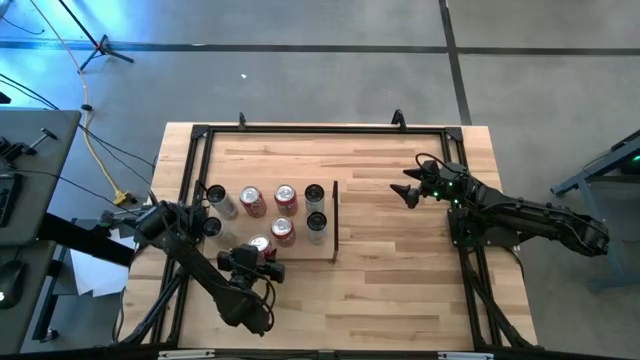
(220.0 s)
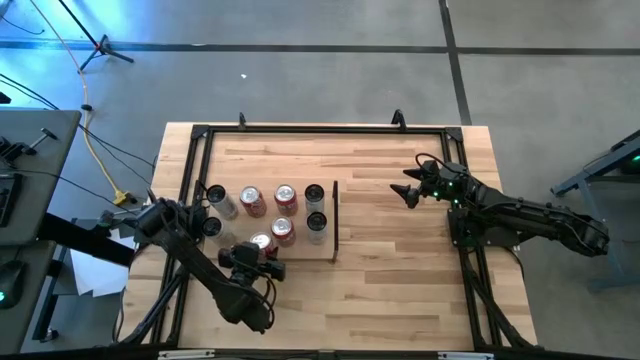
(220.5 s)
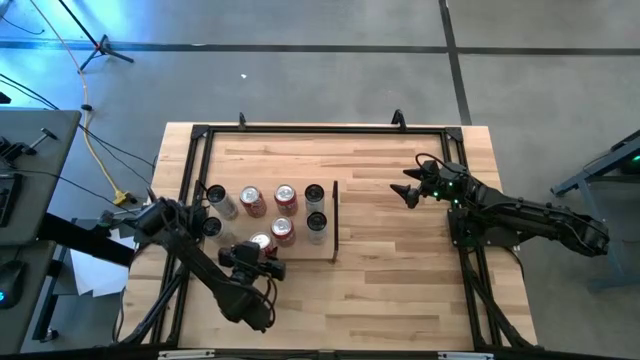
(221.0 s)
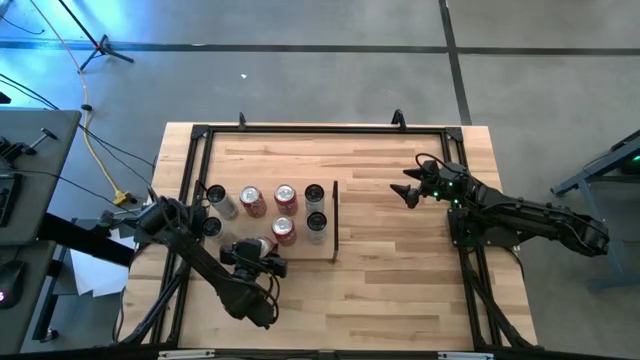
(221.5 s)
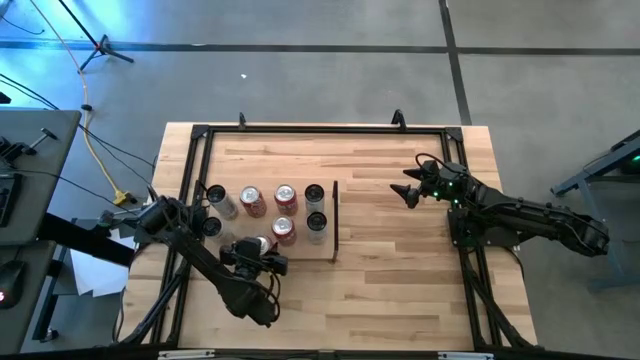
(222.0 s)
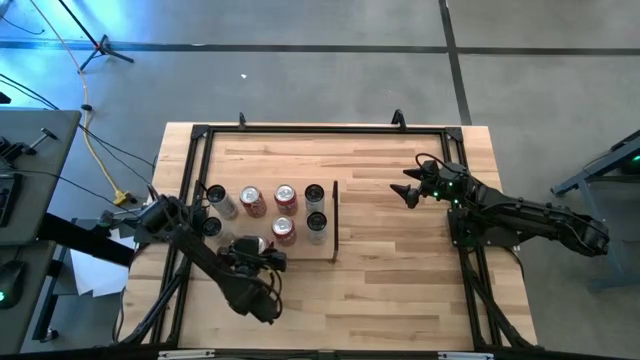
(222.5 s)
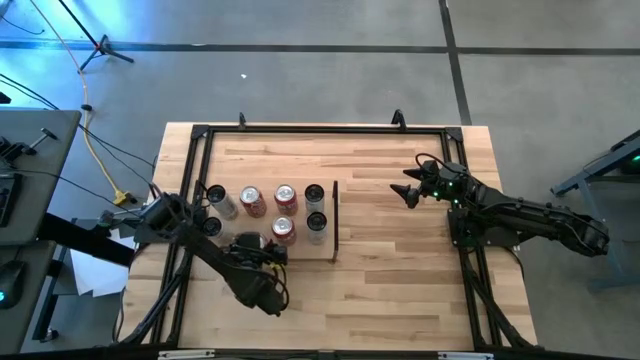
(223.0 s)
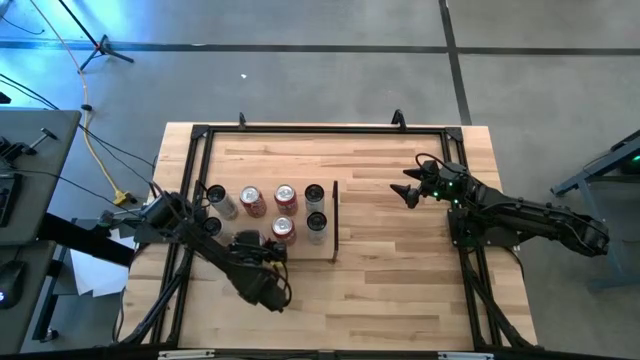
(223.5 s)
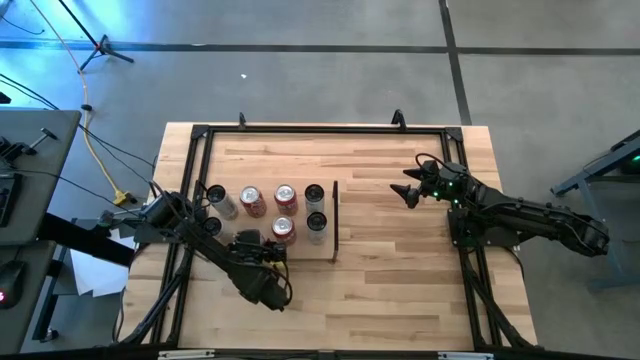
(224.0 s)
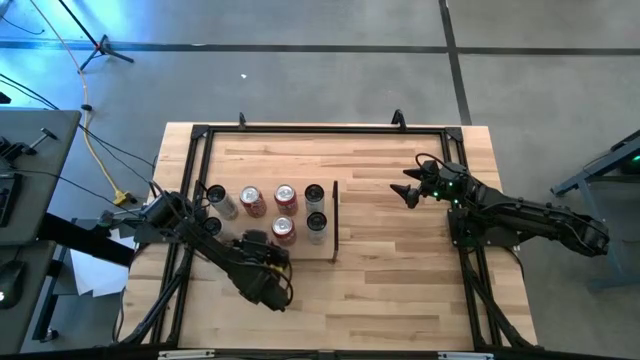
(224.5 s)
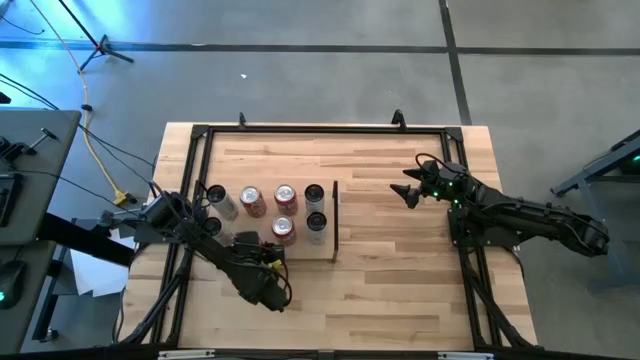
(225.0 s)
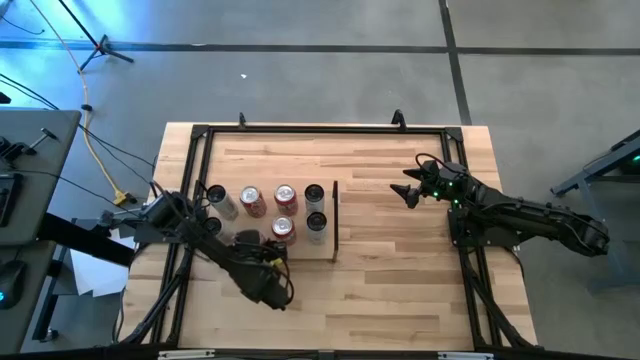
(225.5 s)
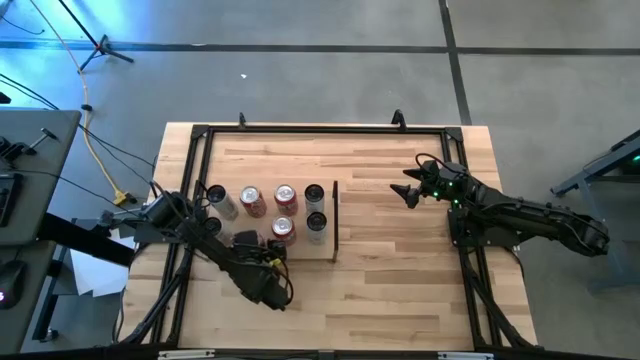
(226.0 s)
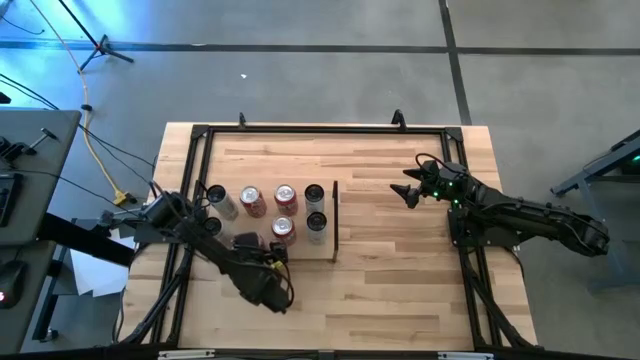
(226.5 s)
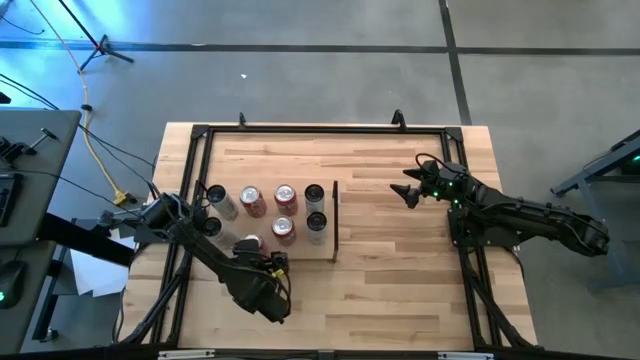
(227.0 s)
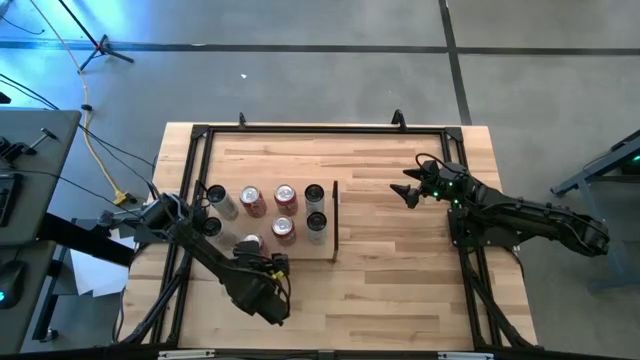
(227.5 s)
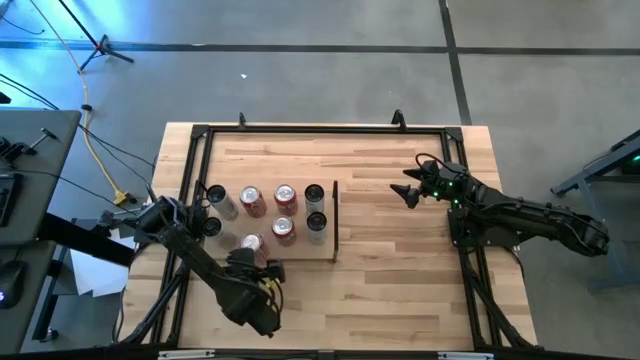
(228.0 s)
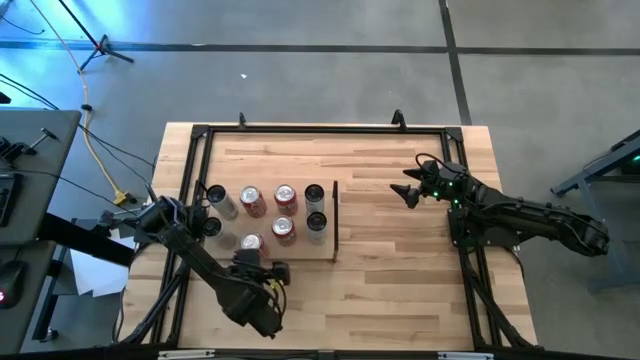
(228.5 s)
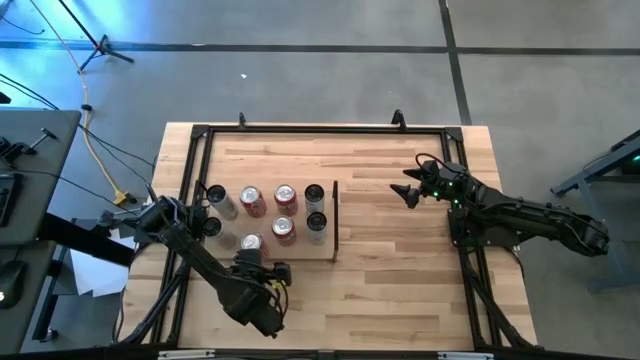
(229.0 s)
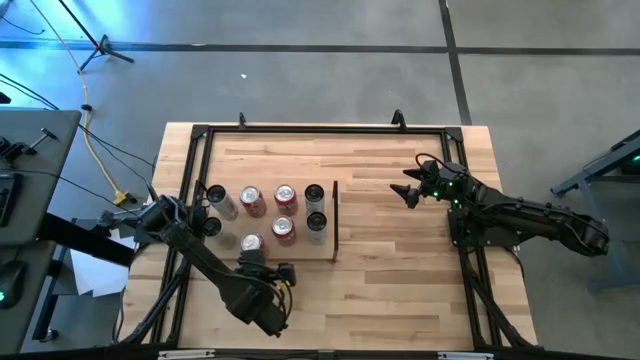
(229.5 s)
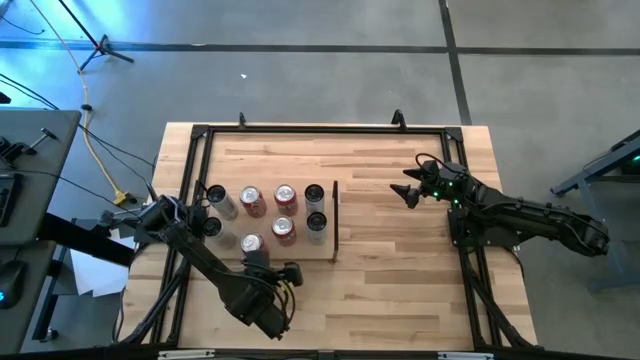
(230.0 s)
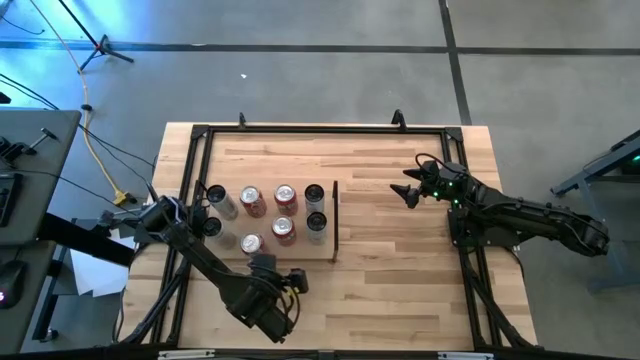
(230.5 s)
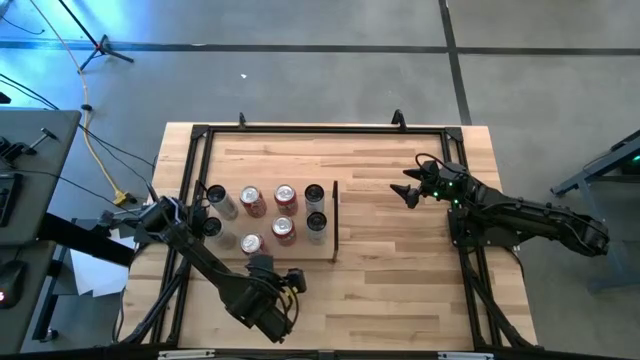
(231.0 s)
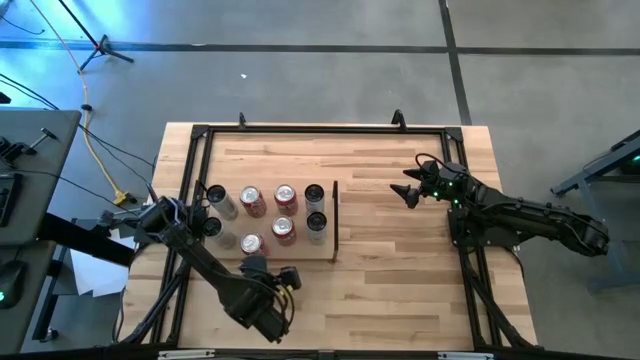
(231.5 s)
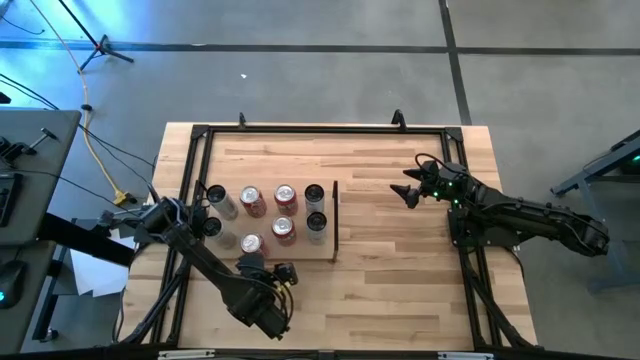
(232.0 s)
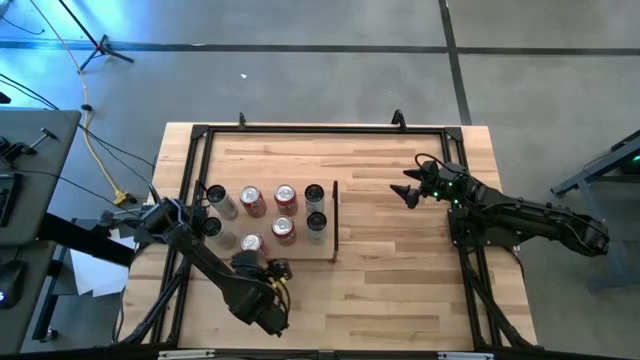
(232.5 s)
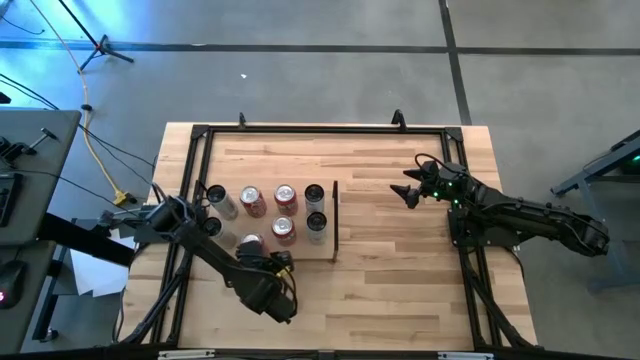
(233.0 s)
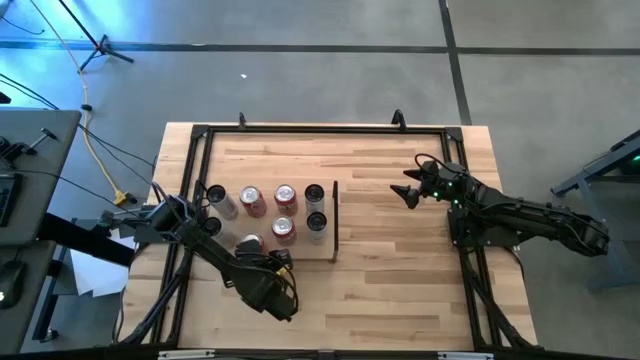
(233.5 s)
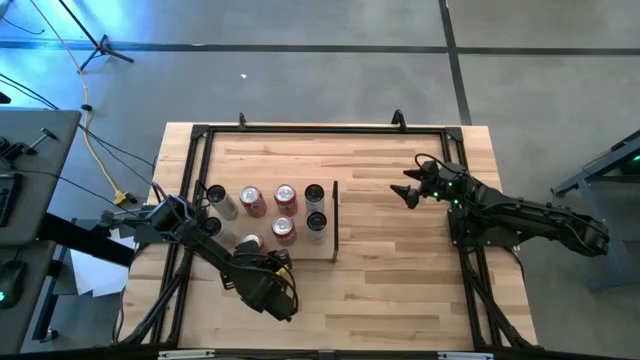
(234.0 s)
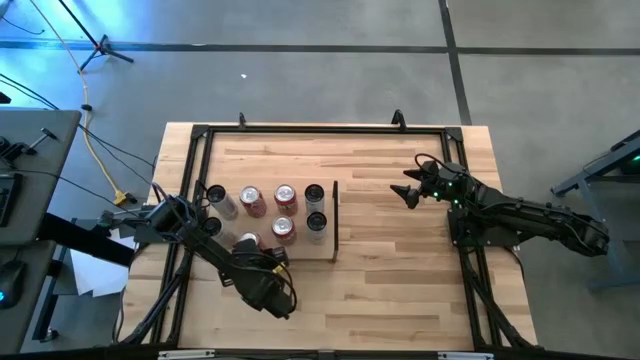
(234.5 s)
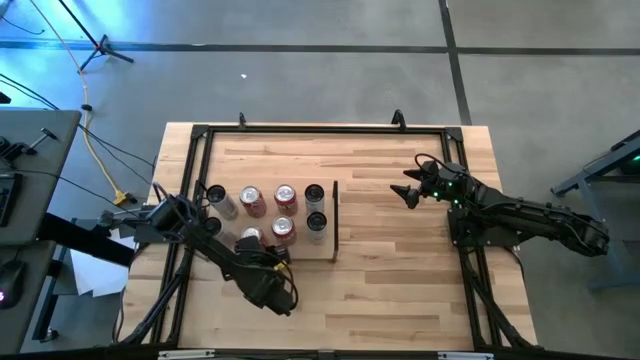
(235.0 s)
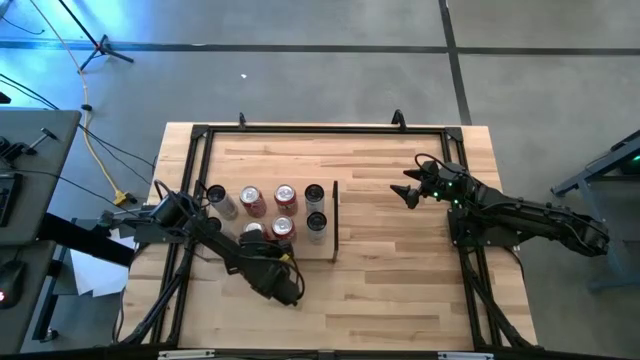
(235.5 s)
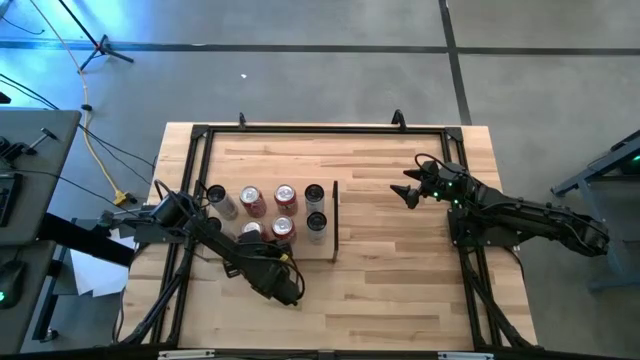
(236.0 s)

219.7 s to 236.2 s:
Task: Place canned beverage on shelf
Put the right red white can aligned with the other red white soda can on the shelf

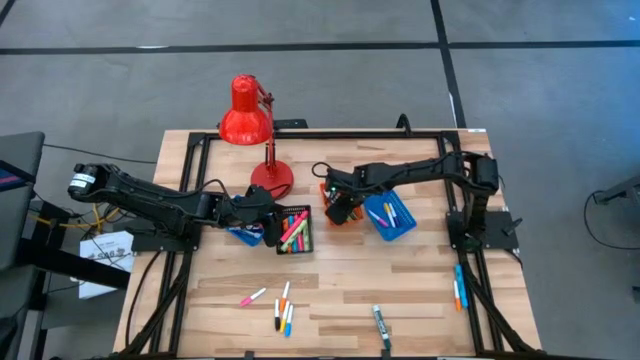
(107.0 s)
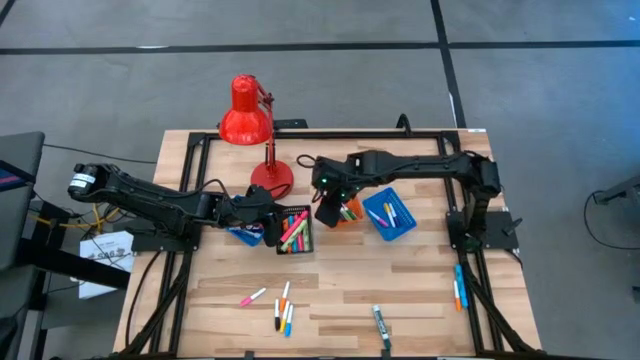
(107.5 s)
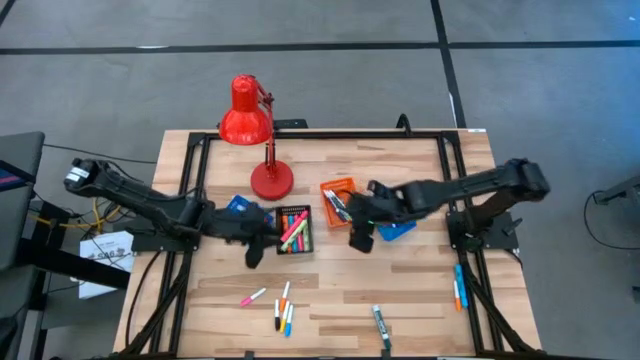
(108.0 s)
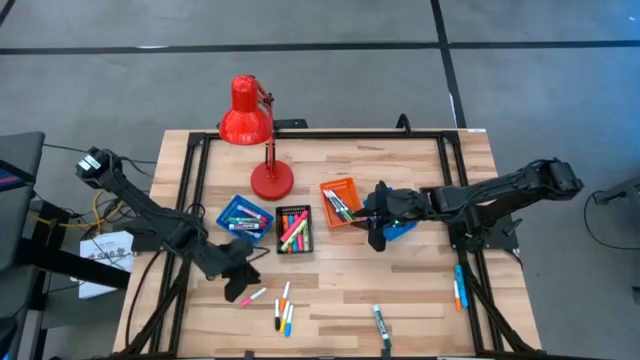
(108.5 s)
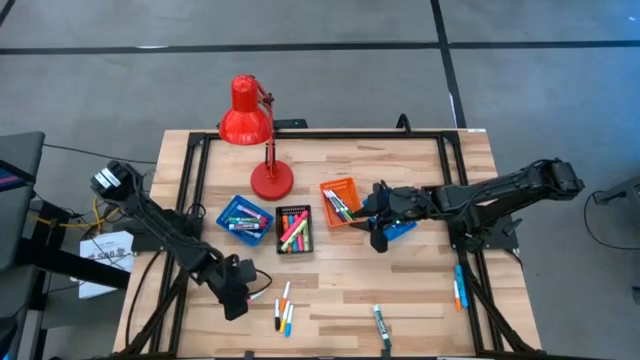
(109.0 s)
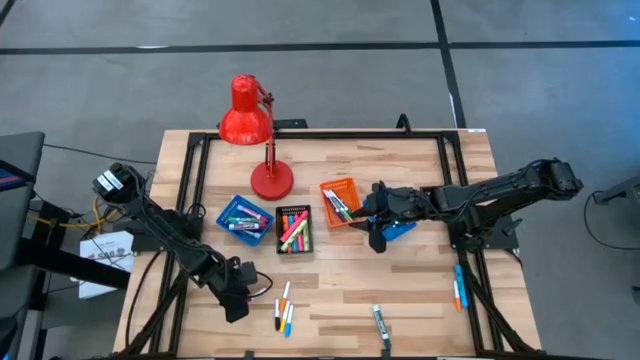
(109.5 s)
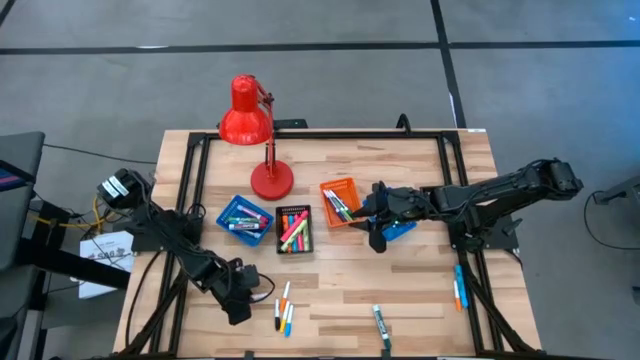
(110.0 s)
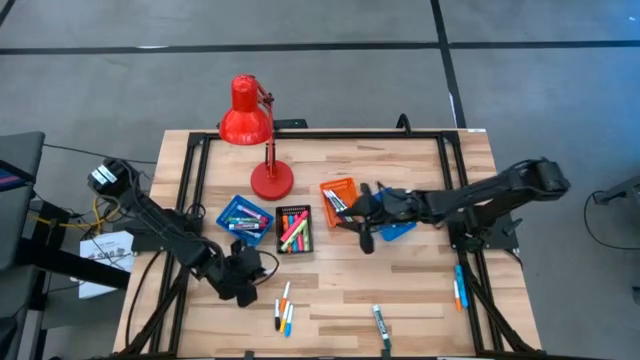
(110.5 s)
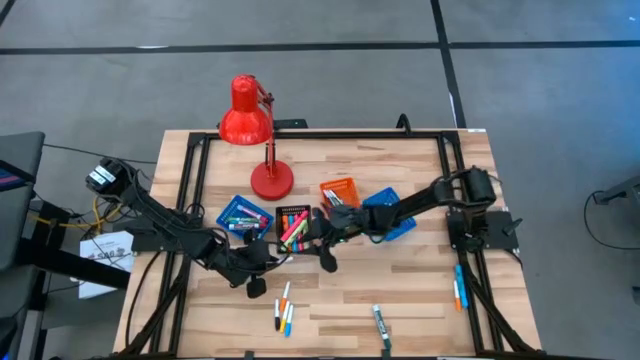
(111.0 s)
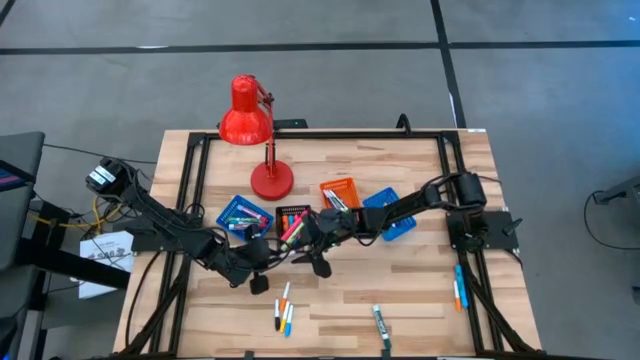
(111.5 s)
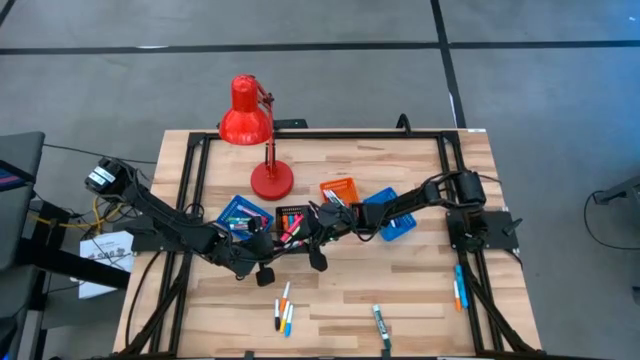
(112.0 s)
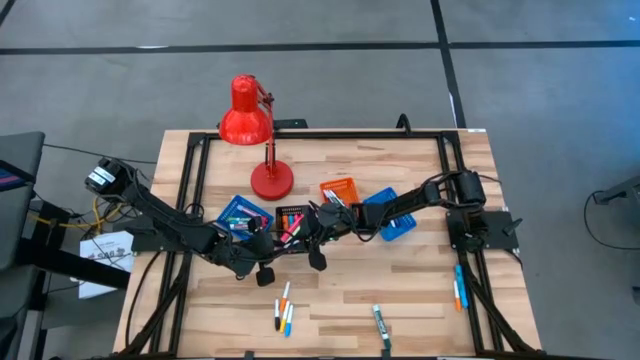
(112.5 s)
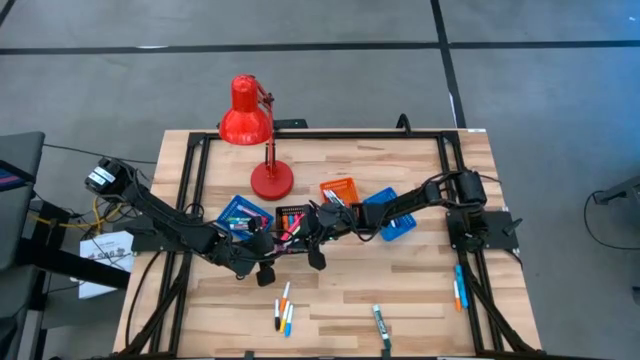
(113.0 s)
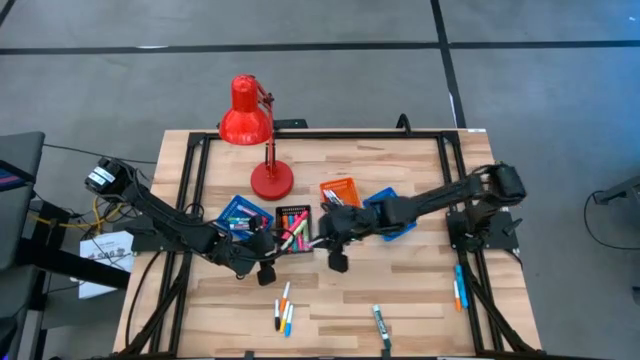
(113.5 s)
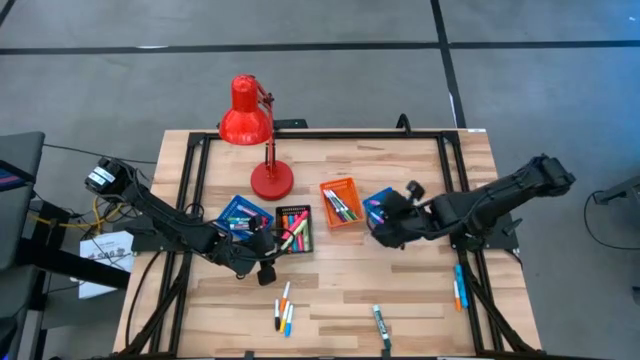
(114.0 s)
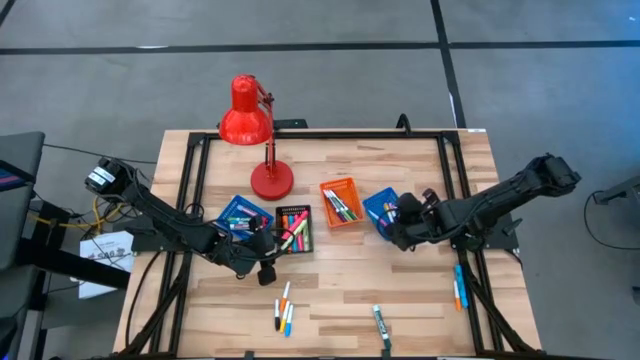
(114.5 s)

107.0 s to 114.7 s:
Task: Pick & Place Markers
Put the small white and pink highlighter pen into the right blue basket
